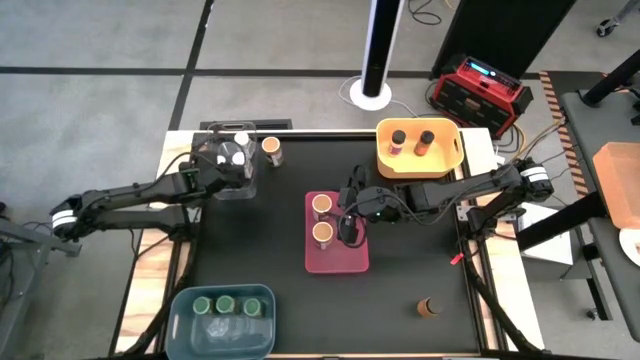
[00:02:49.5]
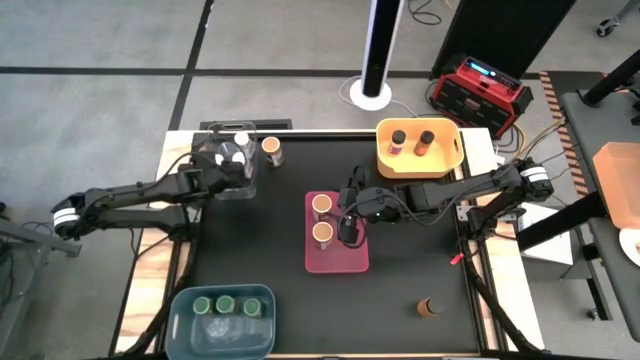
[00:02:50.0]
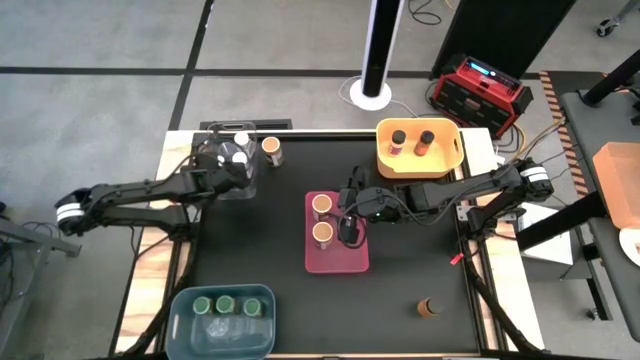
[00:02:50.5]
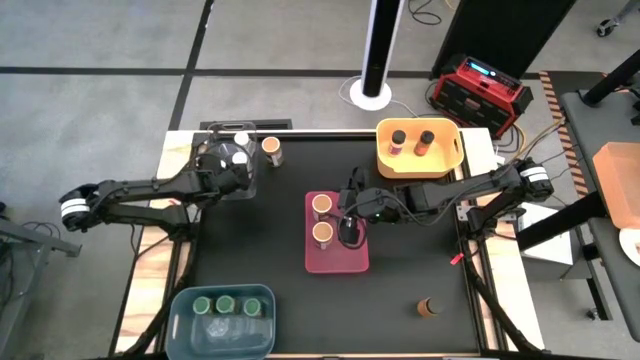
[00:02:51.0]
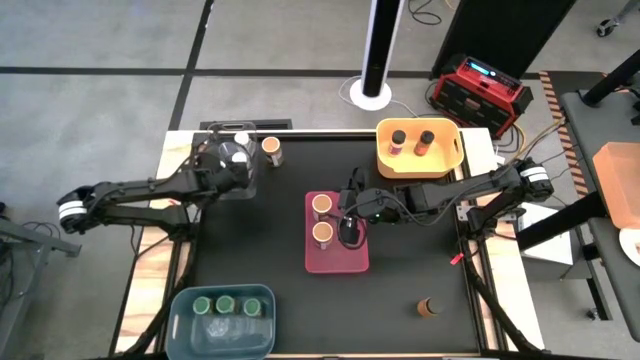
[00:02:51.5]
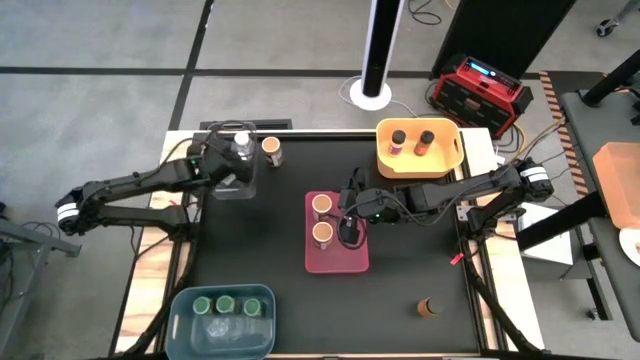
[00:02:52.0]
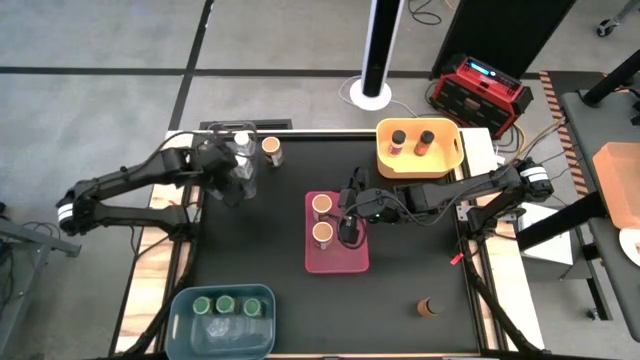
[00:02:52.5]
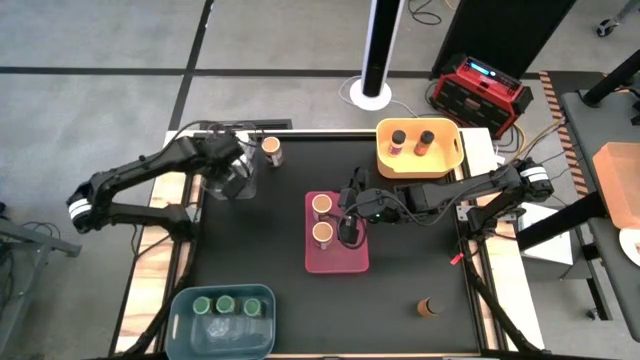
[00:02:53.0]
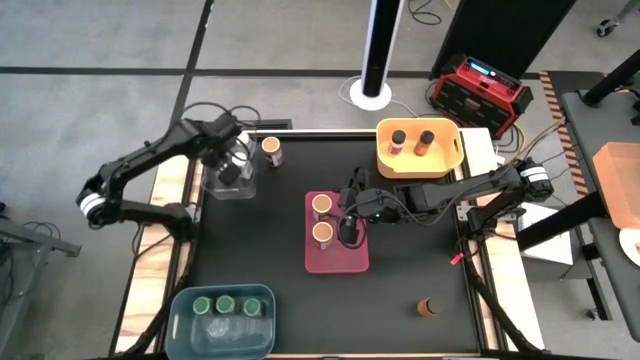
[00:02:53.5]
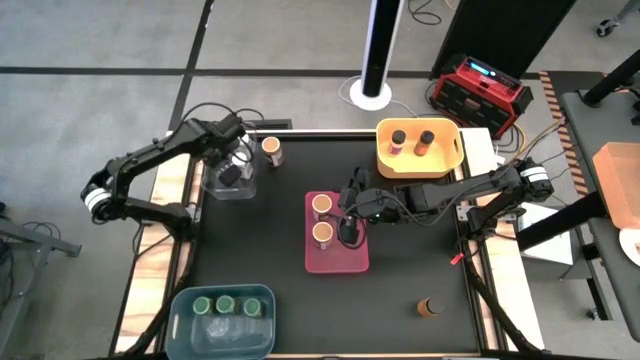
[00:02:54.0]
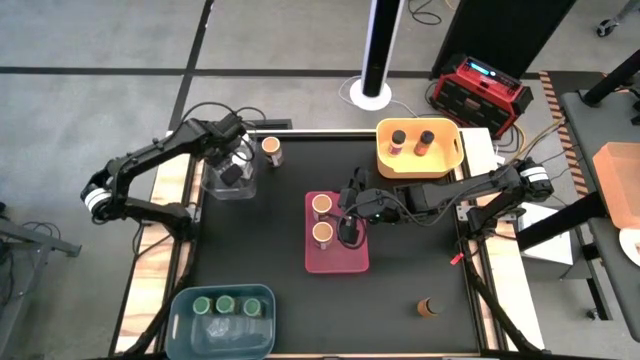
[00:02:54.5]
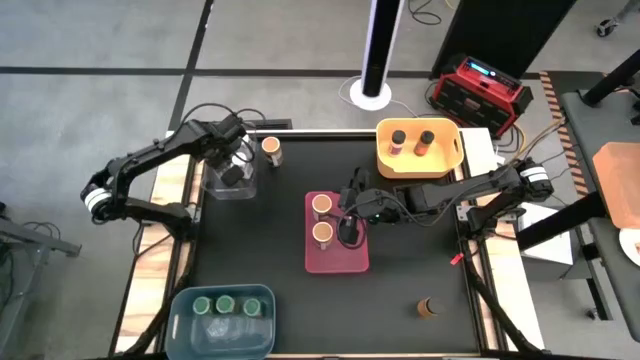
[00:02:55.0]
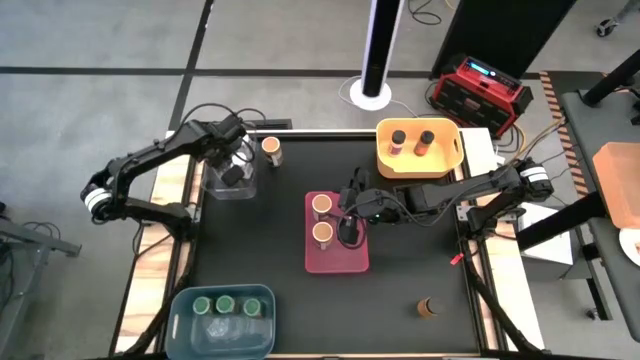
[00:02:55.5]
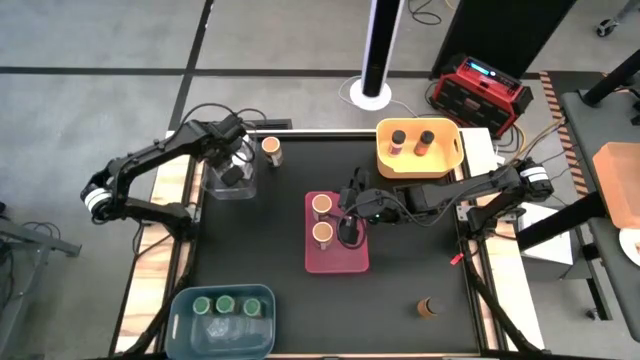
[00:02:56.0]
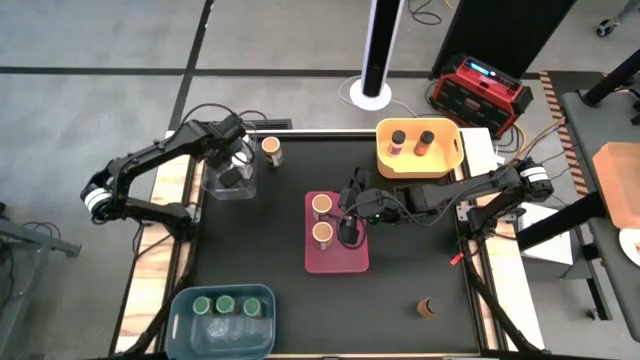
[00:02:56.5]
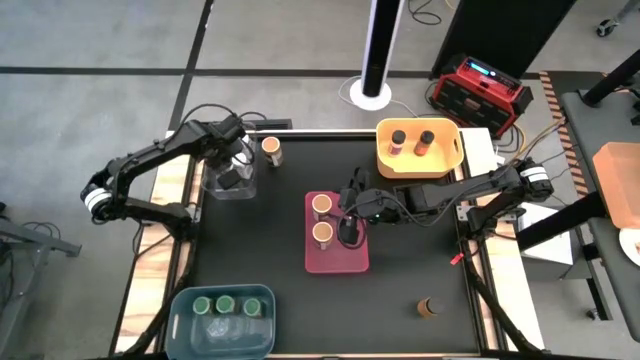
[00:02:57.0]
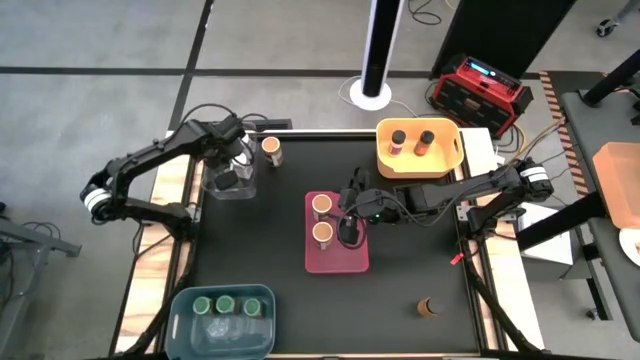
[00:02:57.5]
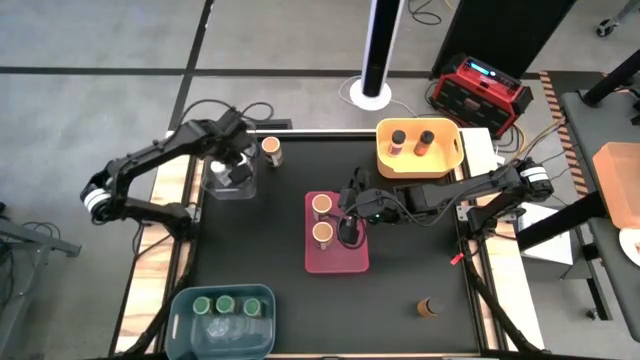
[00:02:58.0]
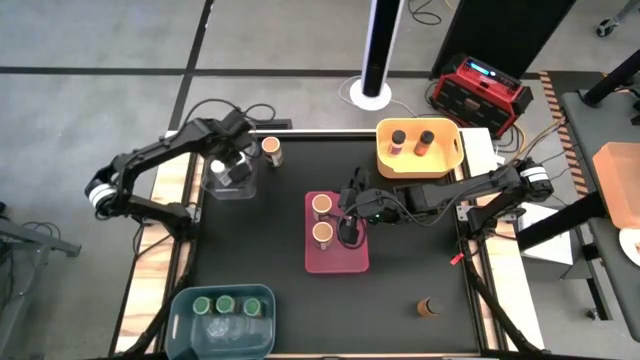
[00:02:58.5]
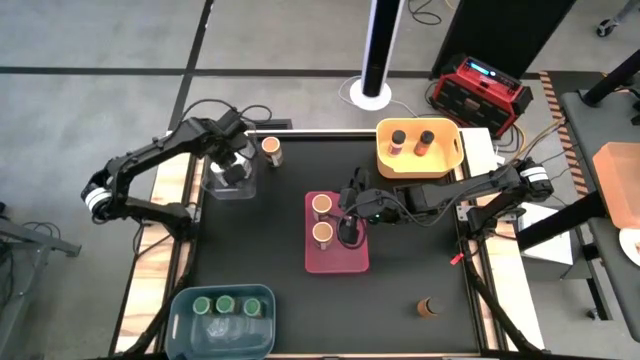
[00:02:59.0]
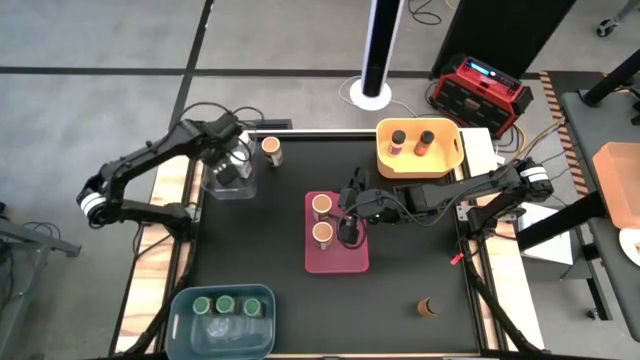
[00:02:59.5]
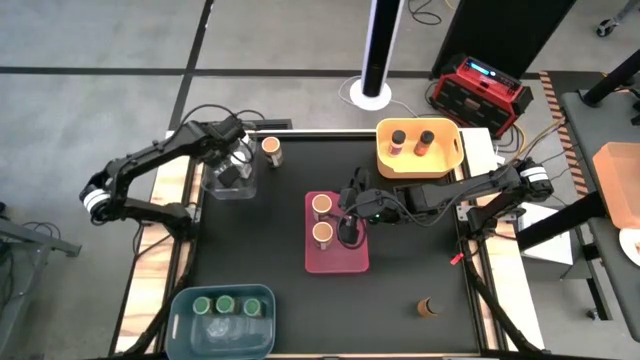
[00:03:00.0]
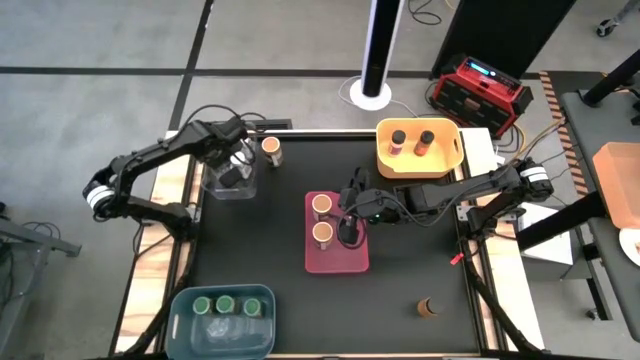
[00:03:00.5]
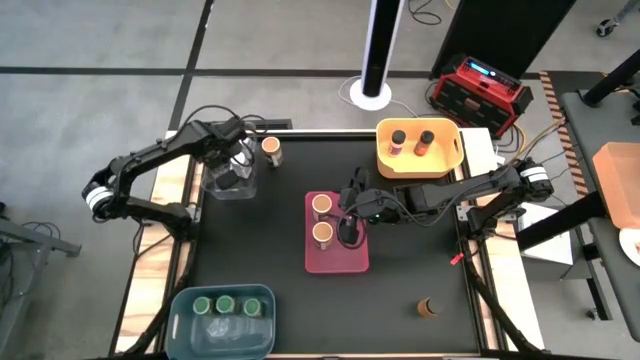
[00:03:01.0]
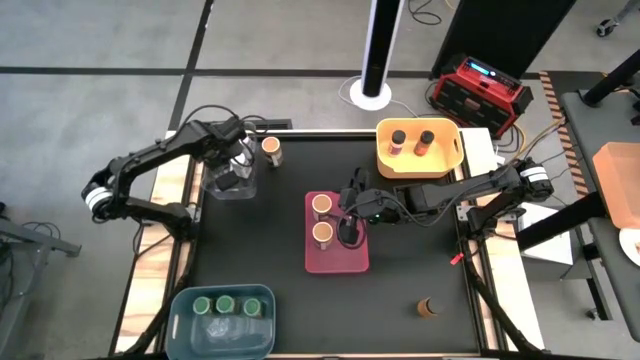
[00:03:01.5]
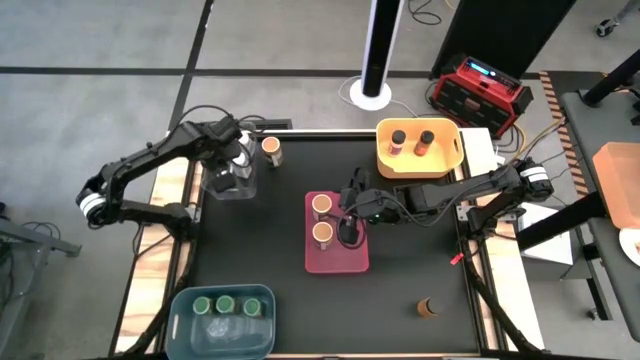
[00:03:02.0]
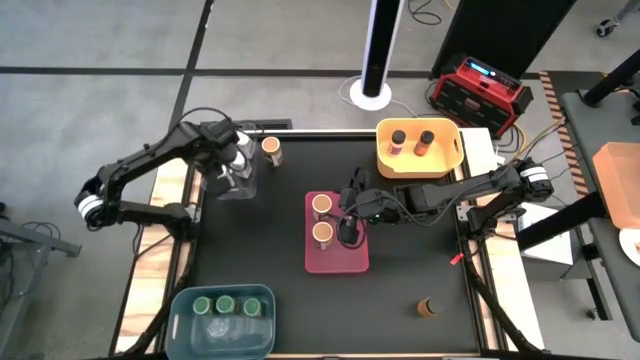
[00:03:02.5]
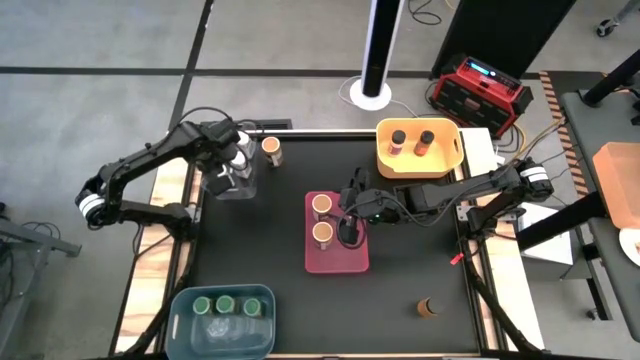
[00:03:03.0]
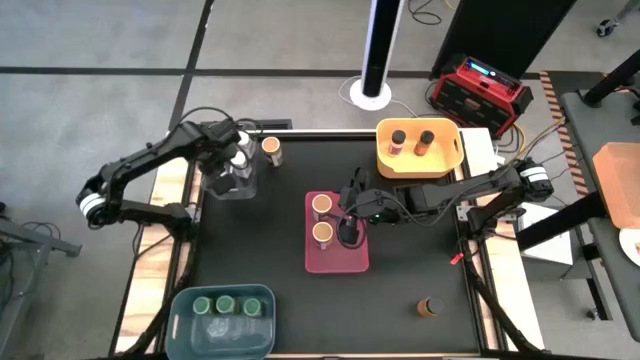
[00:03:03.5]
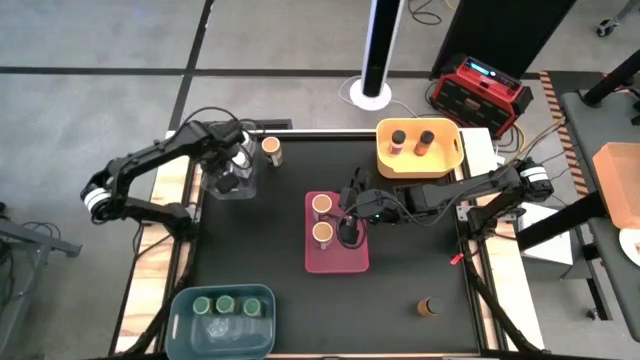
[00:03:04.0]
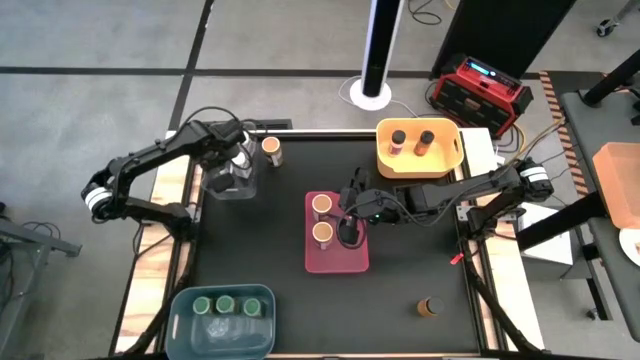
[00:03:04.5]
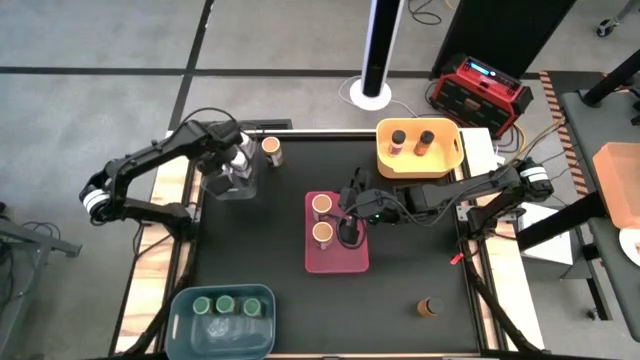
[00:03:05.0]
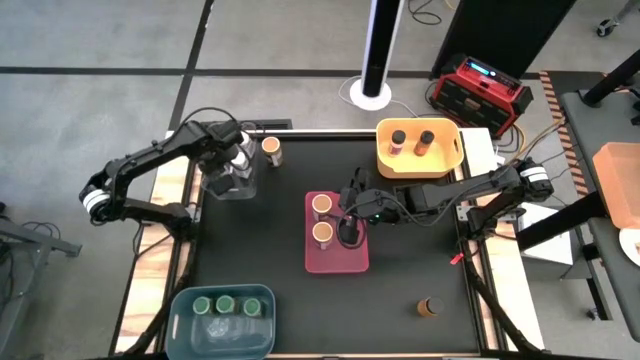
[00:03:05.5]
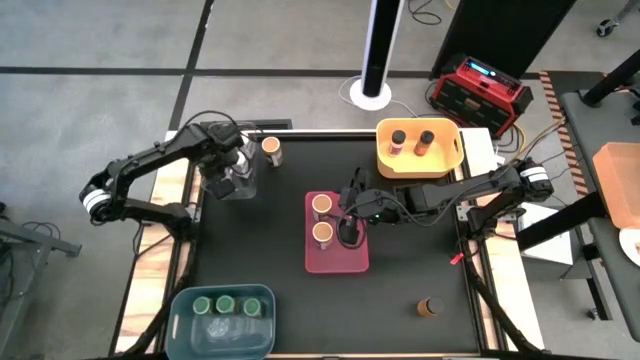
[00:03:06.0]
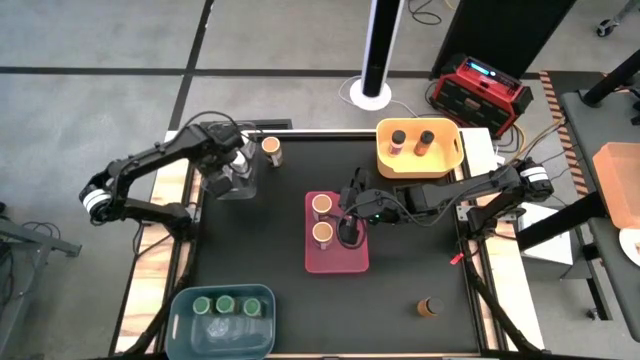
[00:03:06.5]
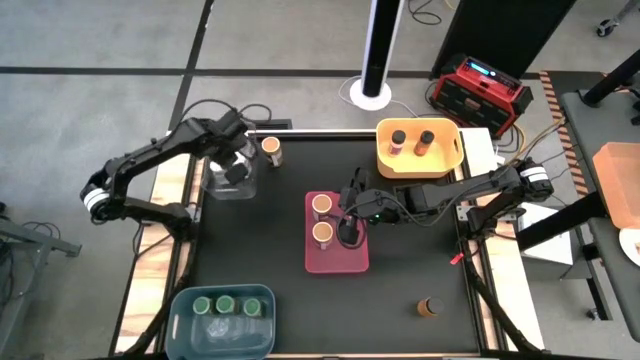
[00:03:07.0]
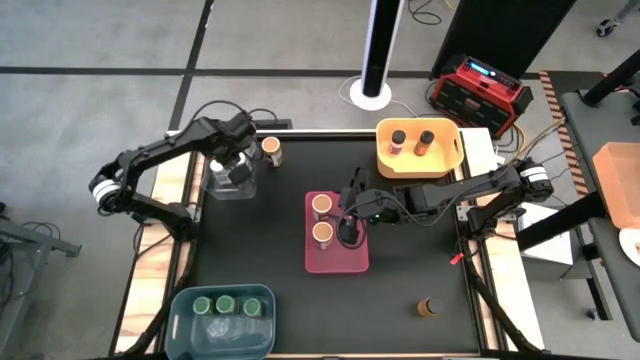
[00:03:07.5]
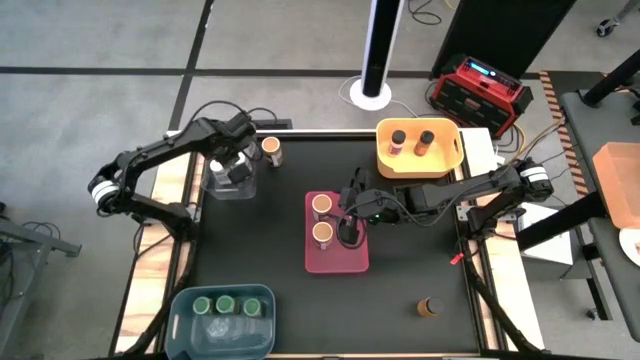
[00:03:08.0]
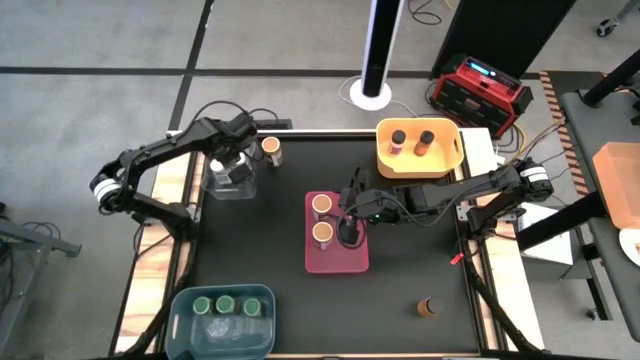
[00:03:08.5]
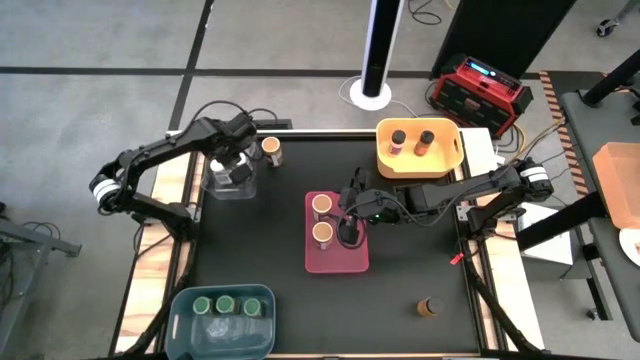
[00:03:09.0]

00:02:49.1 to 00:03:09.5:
Task: Sort spices by type
Put the white seasoning bottle into the transparent bin
